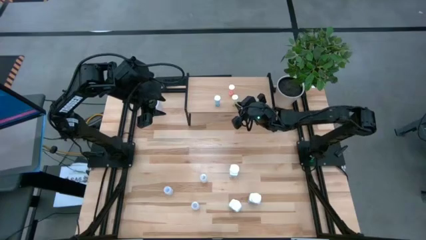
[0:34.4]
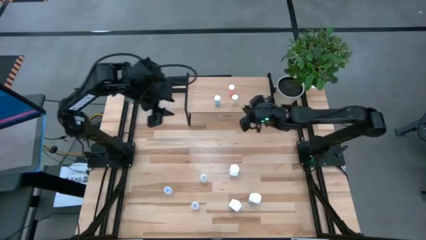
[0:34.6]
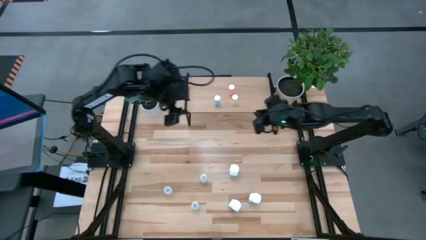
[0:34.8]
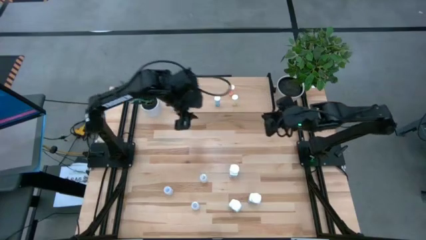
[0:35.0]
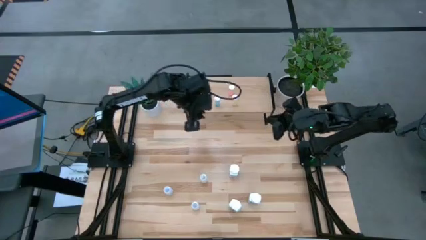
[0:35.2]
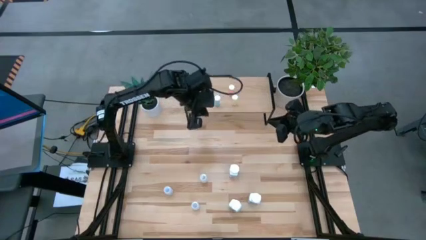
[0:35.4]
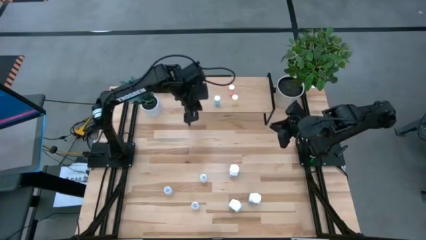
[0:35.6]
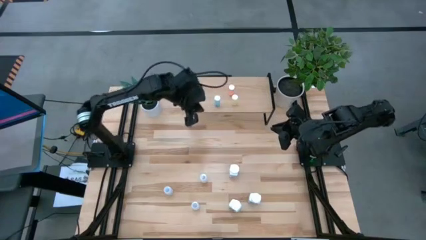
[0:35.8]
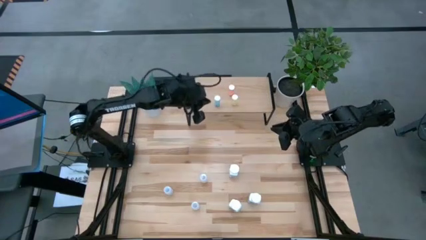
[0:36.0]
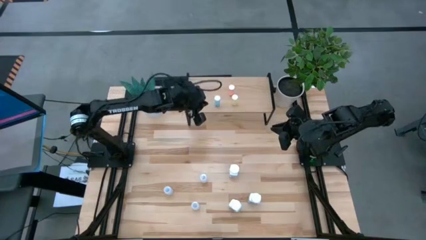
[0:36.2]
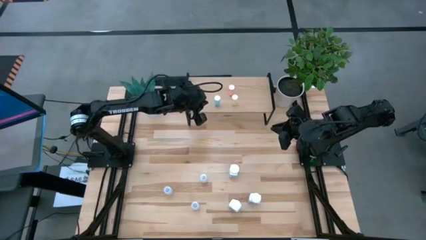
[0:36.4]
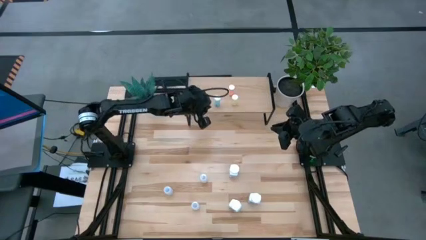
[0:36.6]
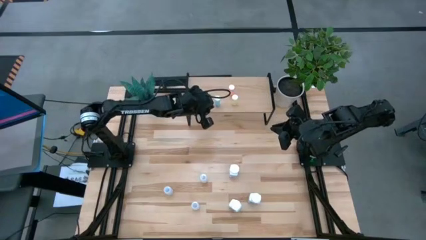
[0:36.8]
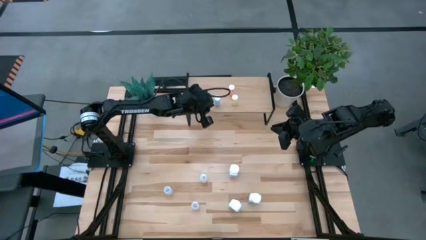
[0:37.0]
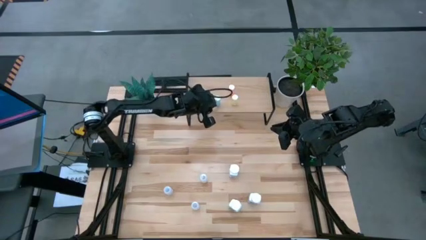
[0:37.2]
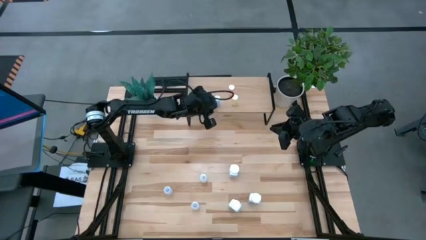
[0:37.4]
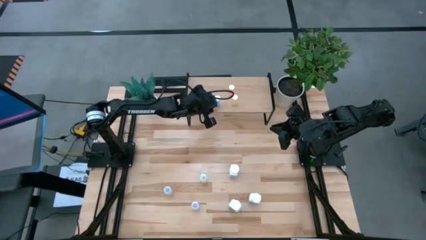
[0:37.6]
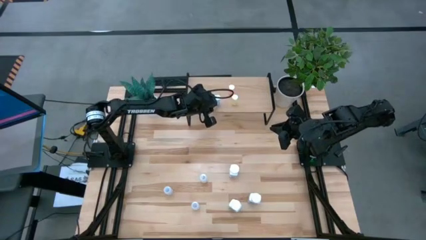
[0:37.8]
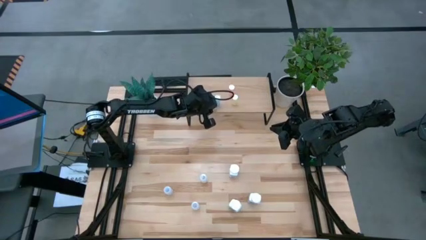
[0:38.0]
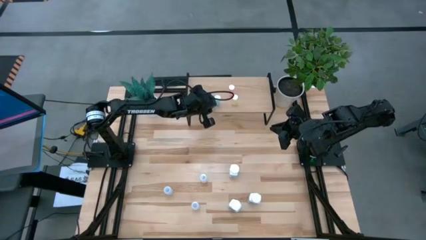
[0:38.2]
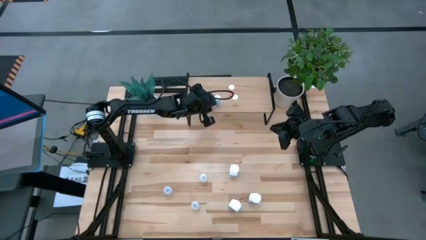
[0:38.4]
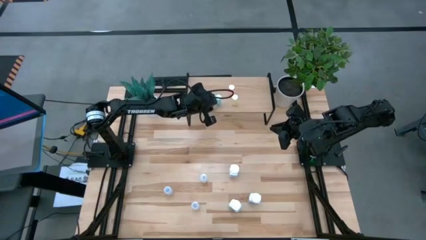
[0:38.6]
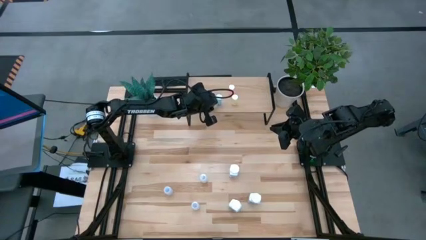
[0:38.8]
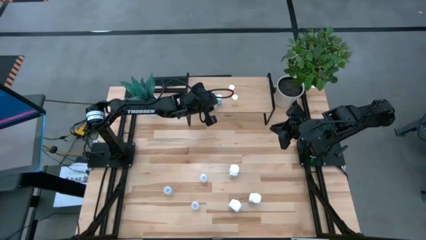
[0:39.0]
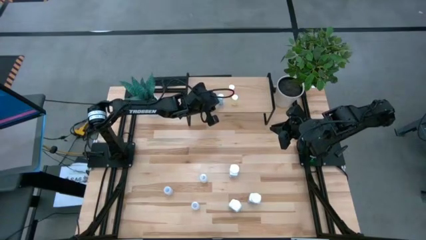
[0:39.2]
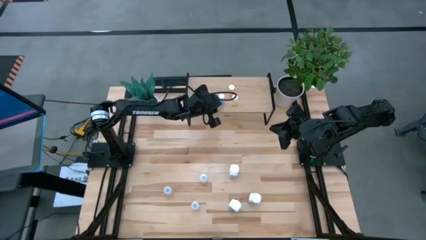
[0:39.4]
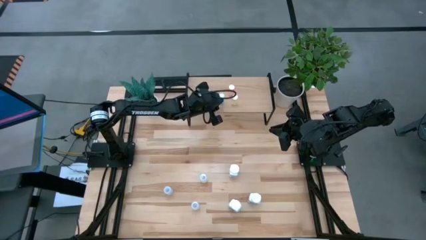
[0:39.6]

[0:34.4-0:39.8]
Task: Pick and place medicine bottles onto shelf by color
Adjust the blue pill bottle on the shelf

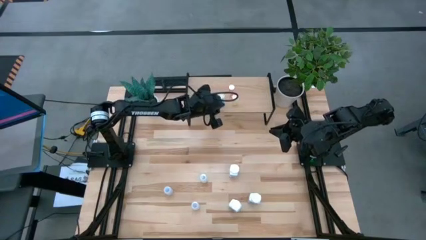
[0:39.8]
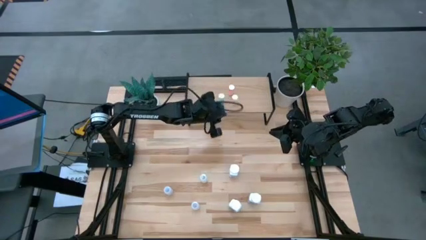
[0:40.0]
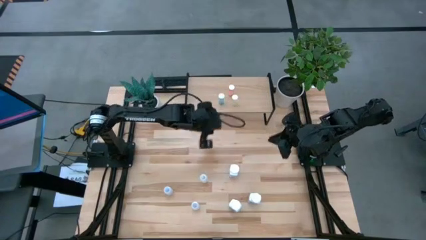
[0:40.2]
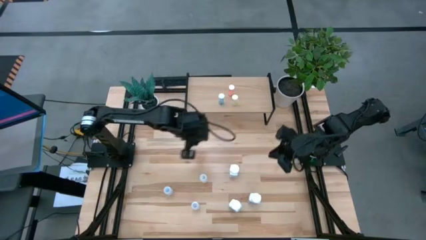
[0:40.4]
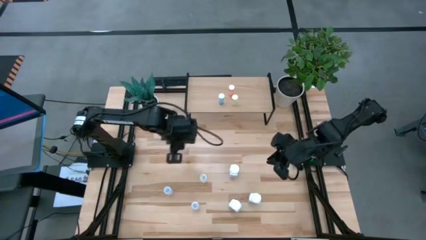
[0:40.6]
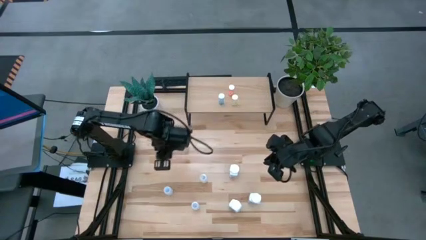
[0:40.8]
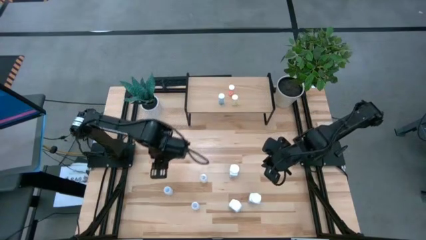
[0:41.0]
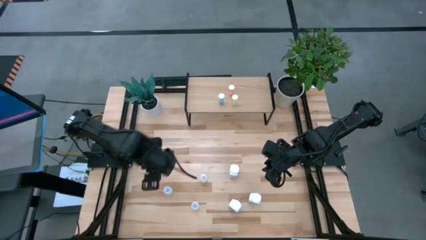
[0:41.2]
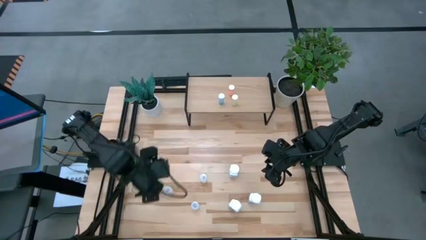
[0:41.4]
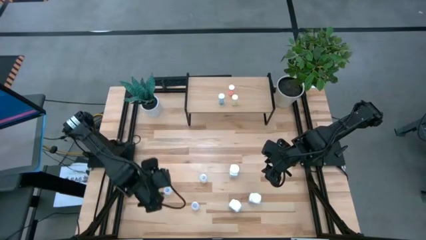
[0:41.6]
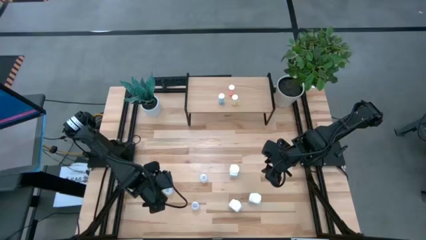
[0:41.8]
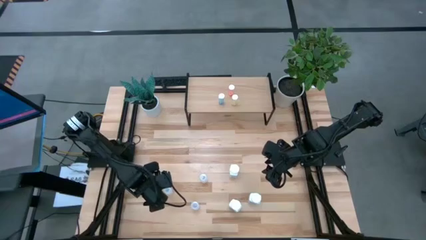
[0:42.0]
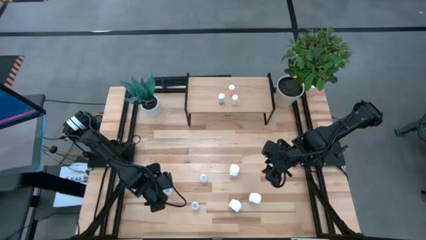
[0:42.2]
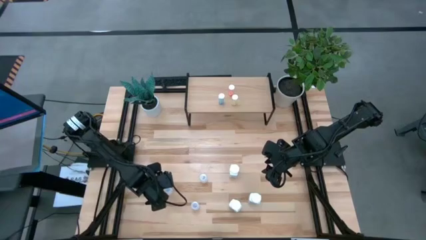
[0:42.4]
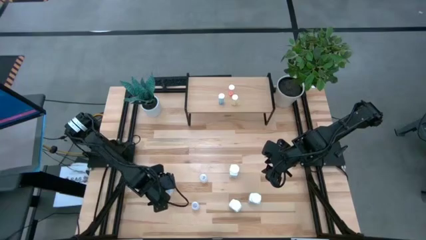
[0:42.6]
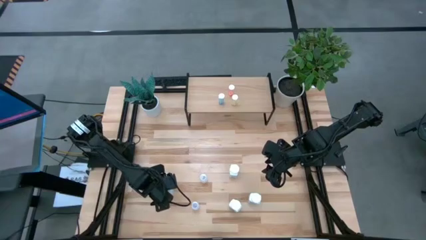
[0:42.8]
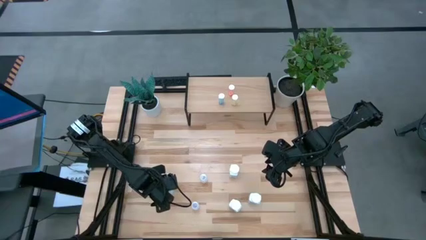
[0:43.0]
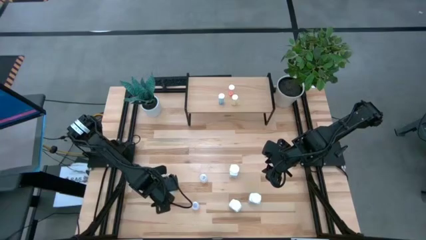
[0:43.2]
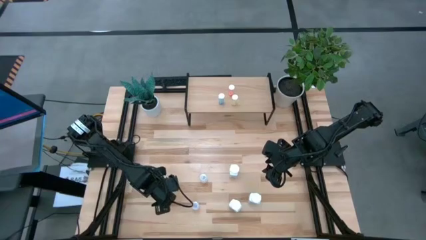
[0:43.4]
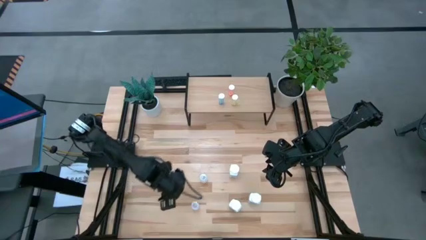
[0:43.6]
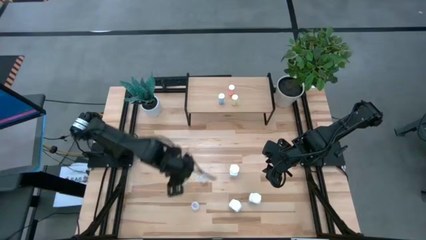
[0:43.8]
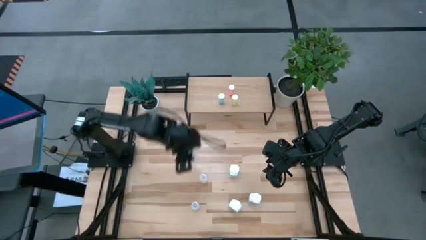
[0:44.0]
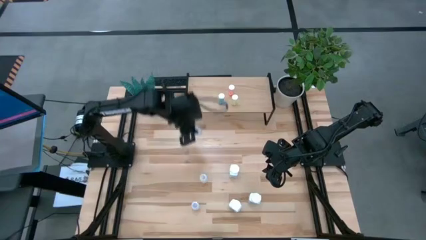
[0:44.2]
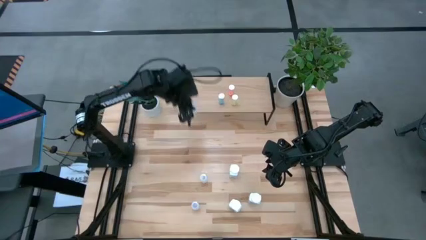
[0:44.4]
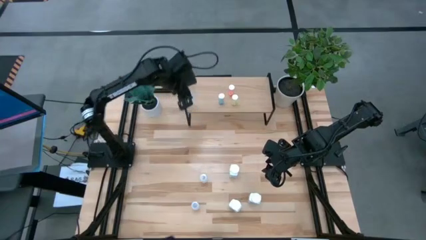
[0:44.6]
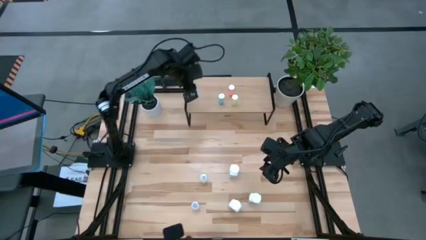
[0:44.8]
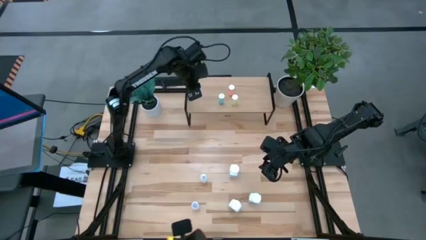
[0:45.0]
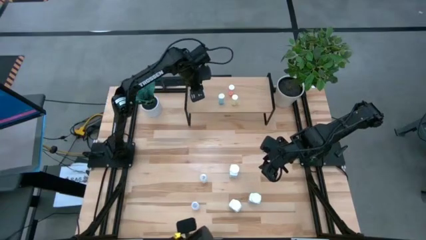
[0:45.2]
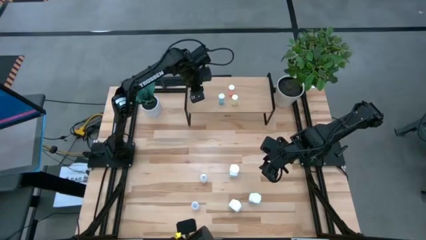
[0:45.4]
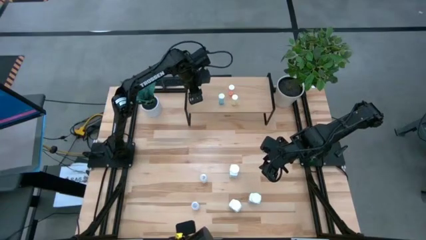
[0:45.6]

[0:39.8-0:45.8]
Put the middle small white pill bottle on the shelf

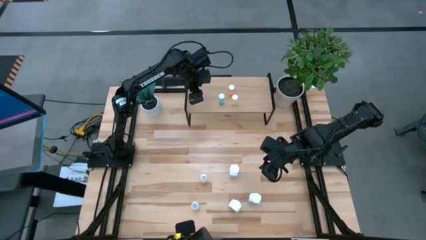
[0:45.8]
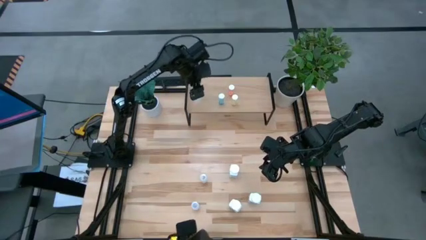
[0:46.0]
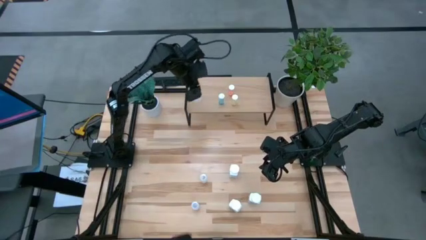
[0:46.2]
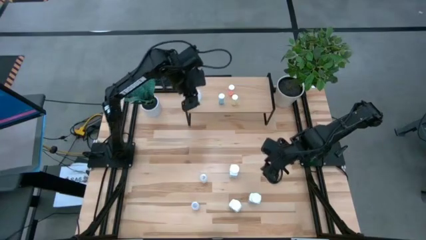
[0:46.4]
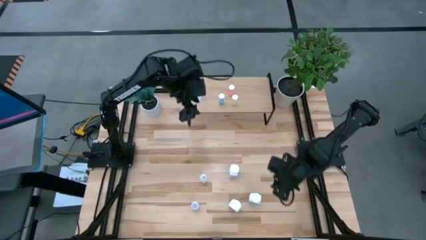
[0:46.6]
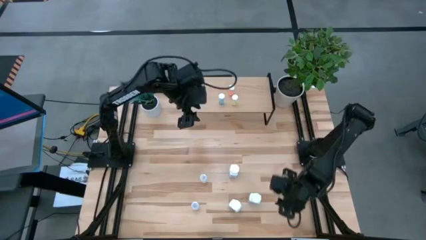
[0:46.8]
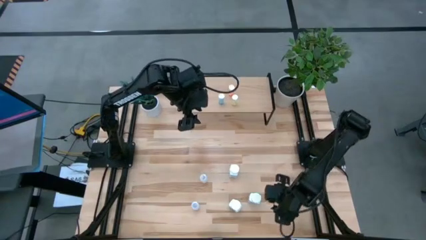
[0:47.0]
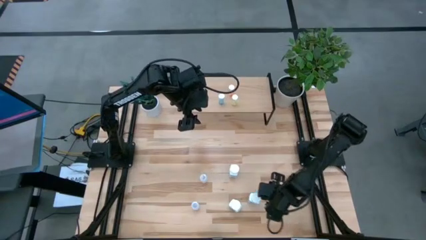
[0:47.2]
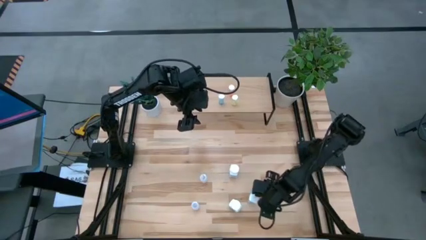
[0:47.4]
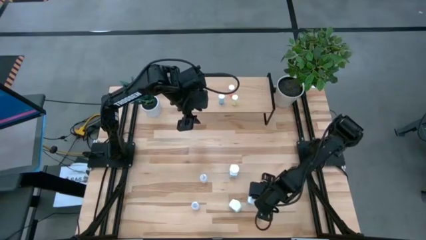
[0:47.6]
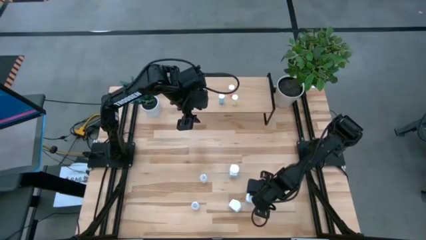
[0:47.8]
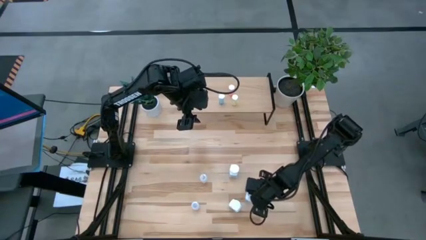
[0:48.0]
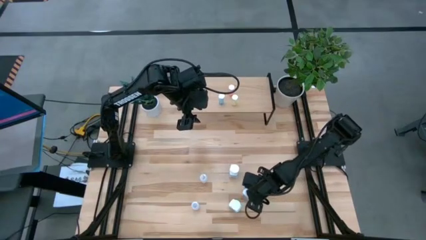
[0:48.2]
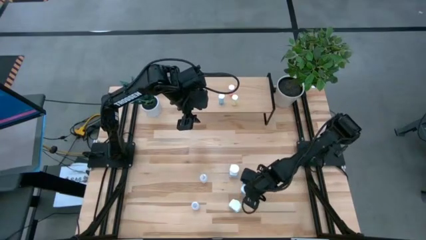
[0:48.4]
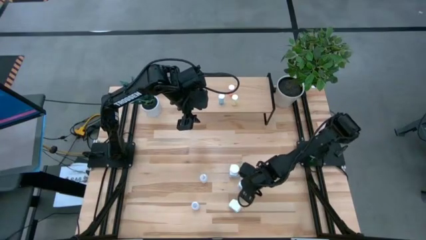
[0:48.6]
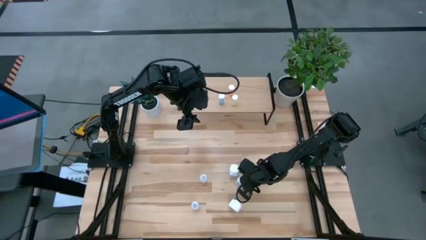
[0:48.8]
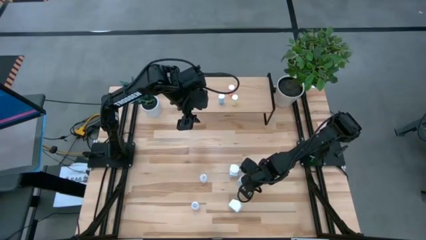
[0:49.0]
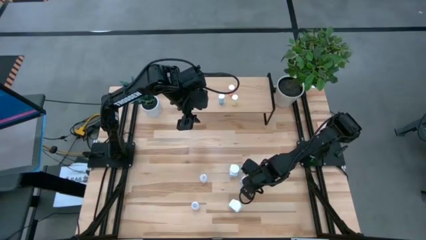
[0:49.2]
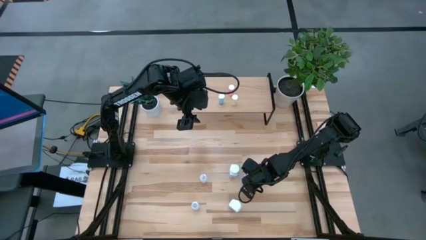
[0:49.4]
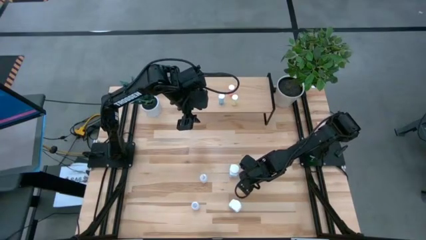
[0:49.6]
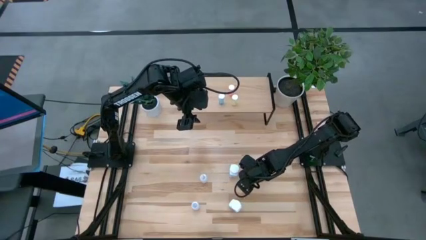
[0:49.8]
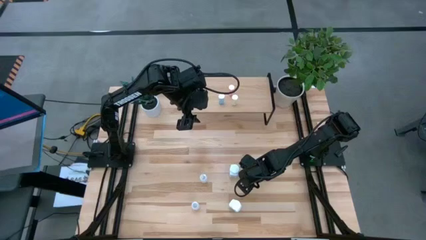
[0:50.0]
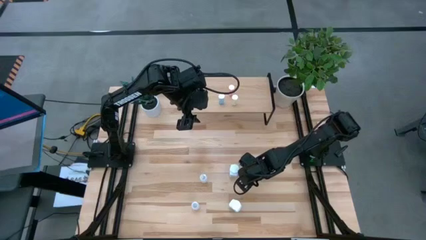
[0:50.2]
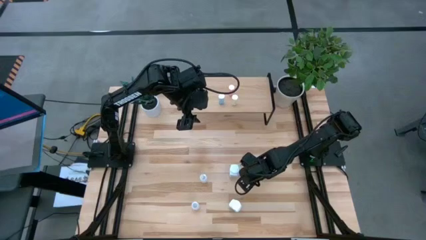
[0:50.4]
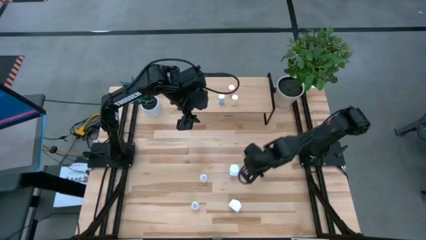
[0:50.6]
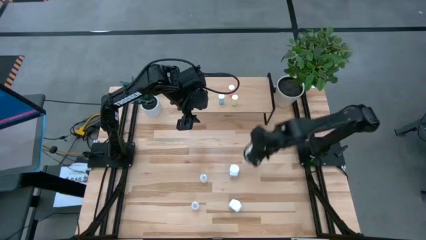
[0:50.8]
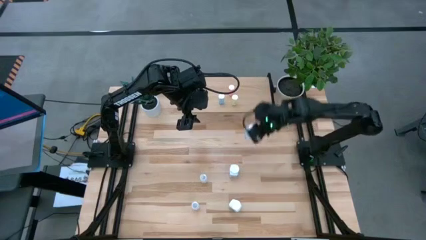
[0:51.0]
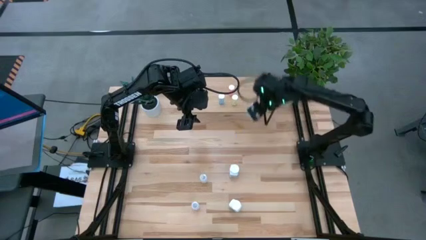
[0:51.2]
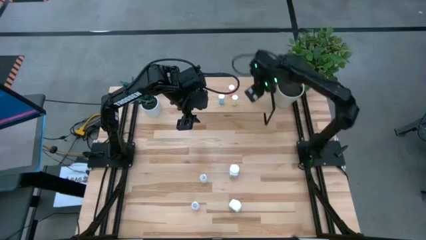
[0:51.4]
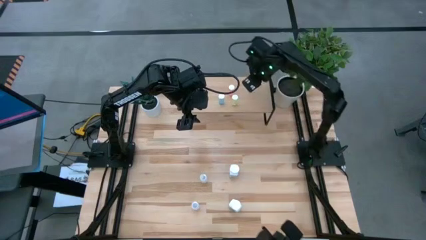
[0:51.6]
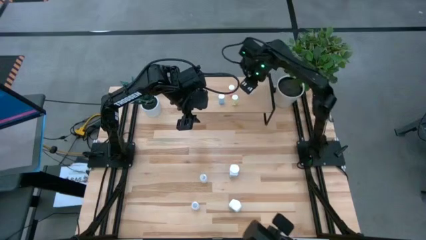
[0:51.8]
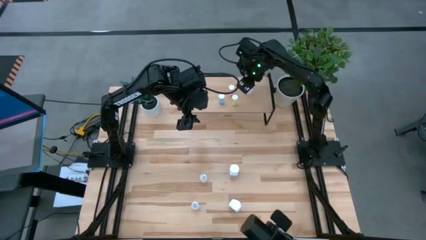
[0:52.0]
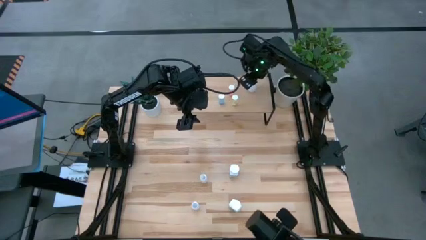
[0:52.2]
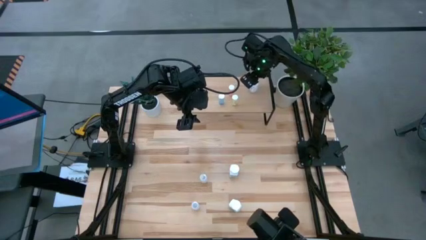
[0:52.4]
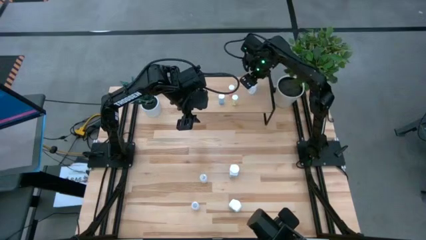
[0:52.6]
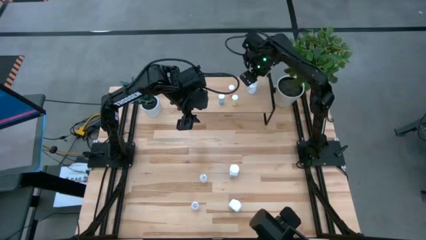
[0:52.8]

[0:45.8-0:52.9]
Put the middle large white pill bottle on the shelf
